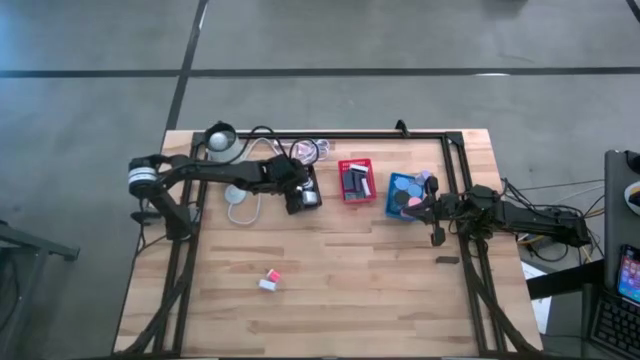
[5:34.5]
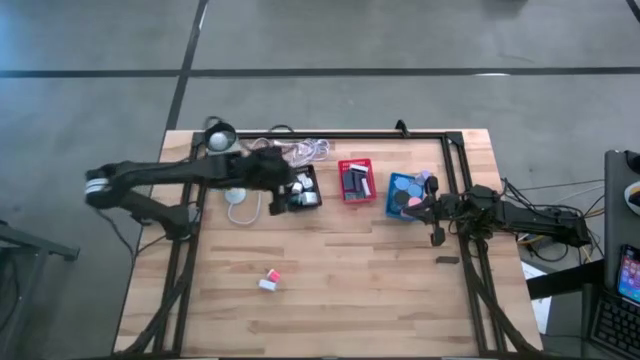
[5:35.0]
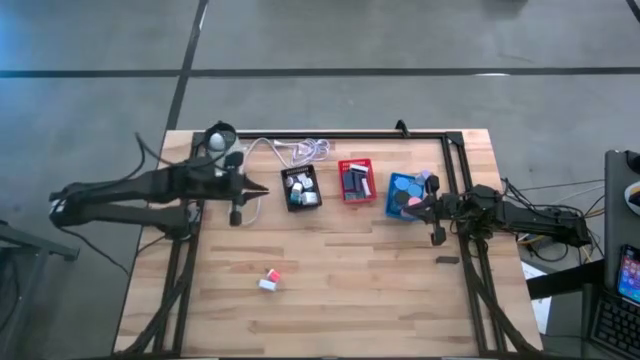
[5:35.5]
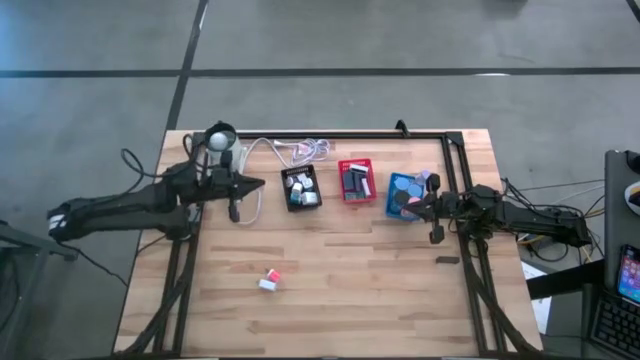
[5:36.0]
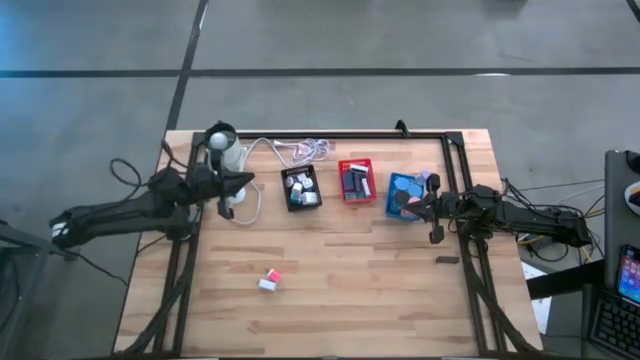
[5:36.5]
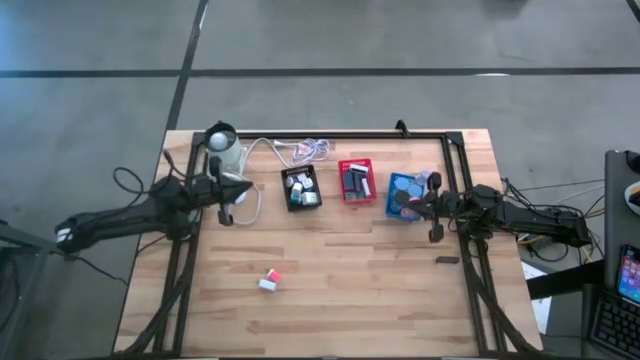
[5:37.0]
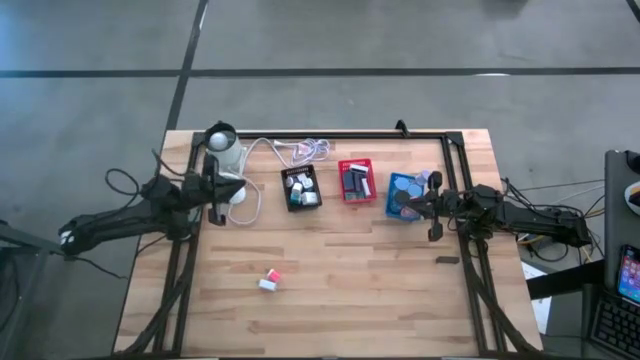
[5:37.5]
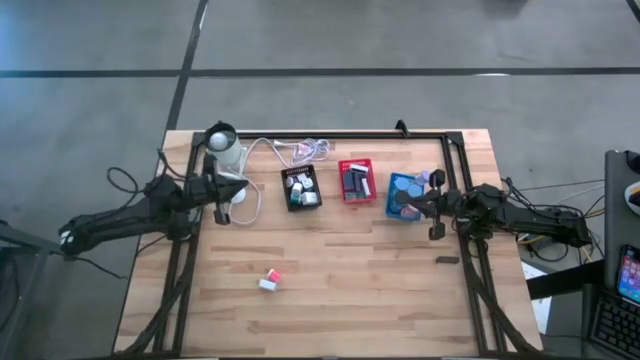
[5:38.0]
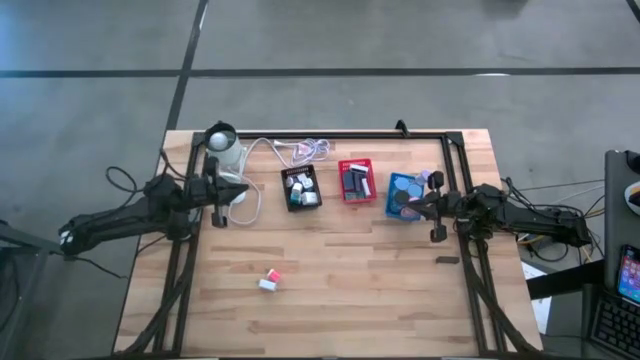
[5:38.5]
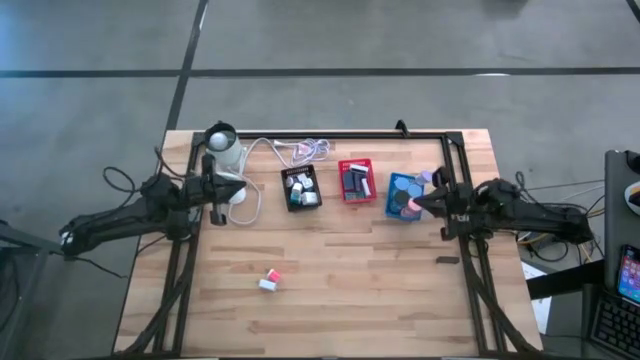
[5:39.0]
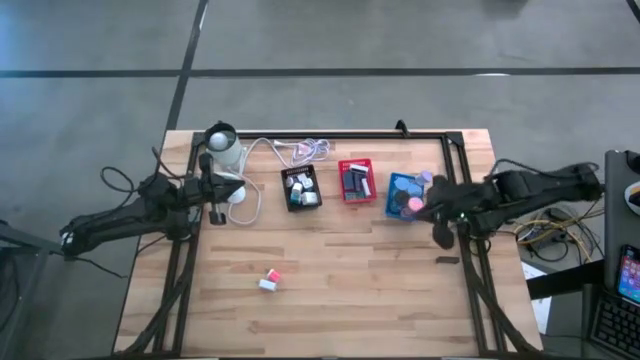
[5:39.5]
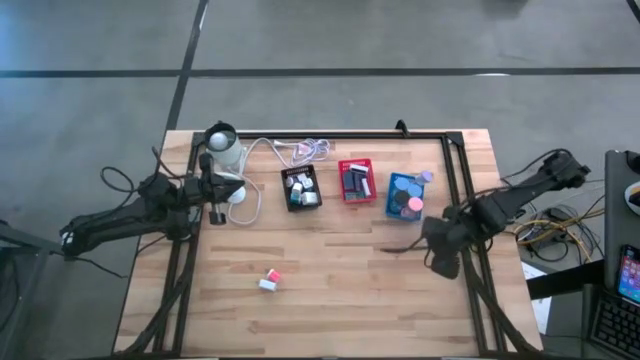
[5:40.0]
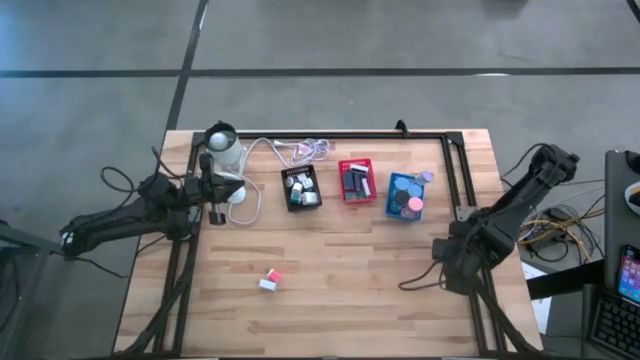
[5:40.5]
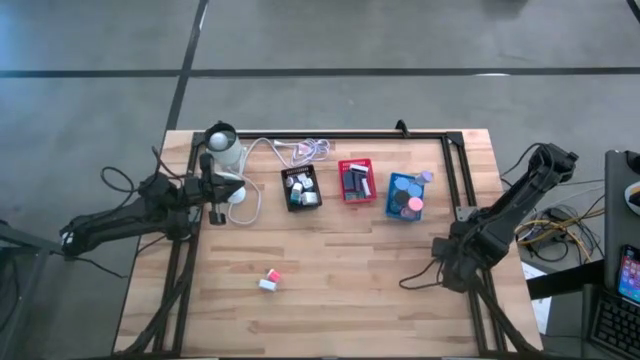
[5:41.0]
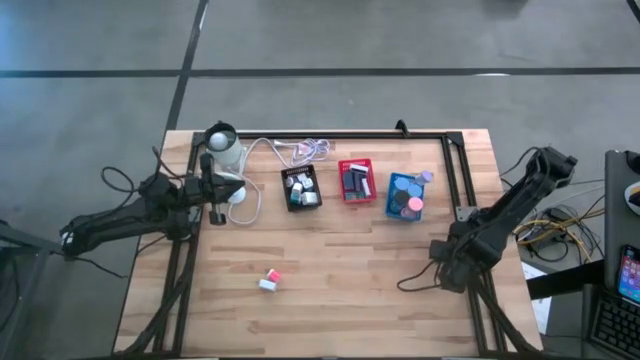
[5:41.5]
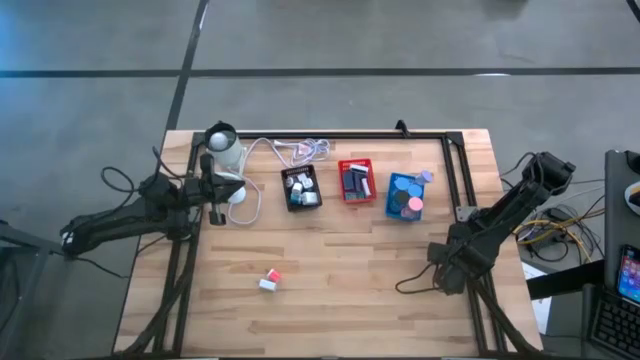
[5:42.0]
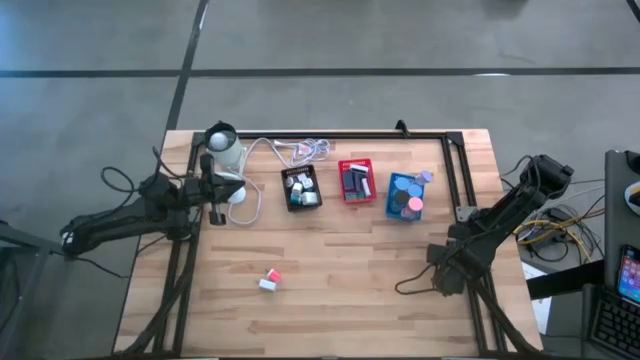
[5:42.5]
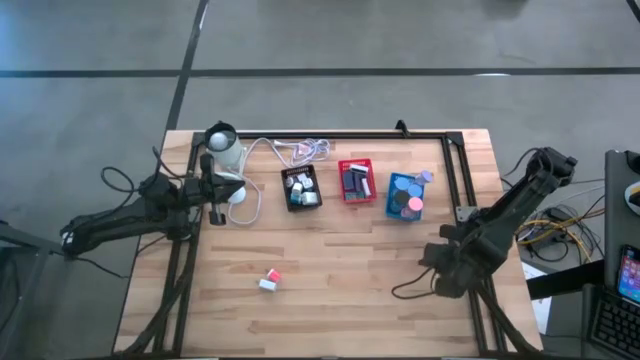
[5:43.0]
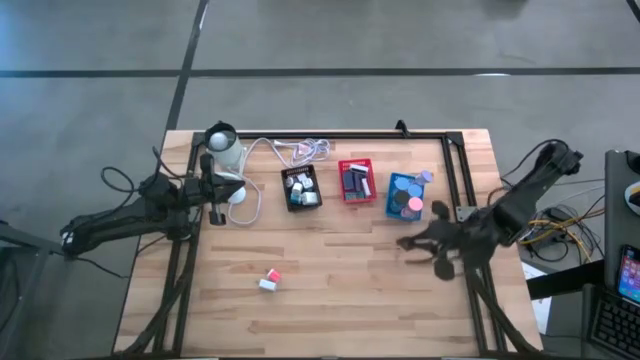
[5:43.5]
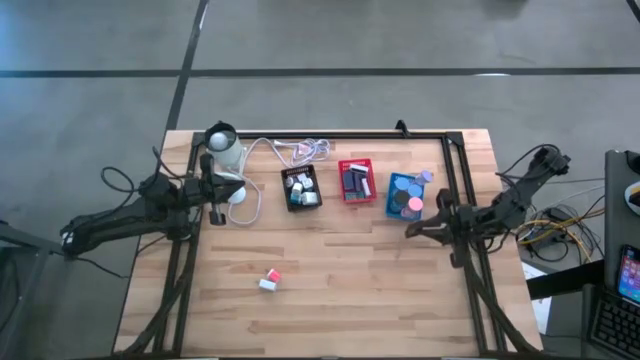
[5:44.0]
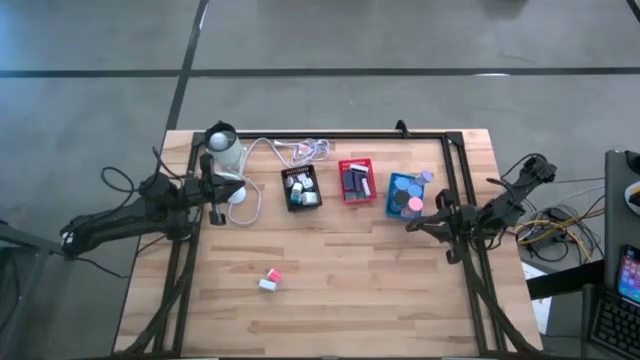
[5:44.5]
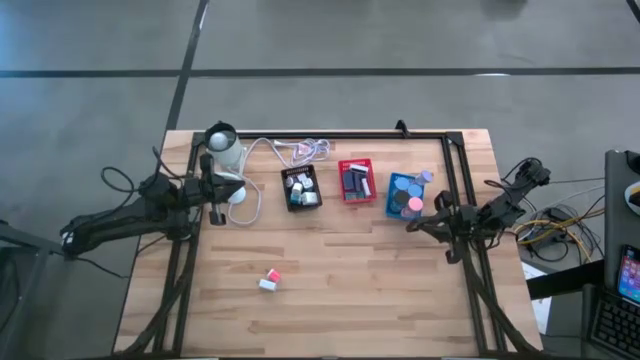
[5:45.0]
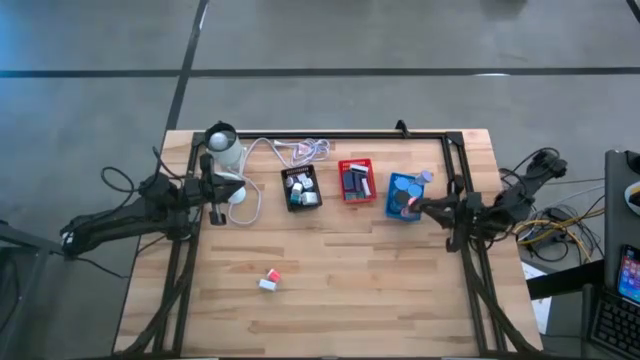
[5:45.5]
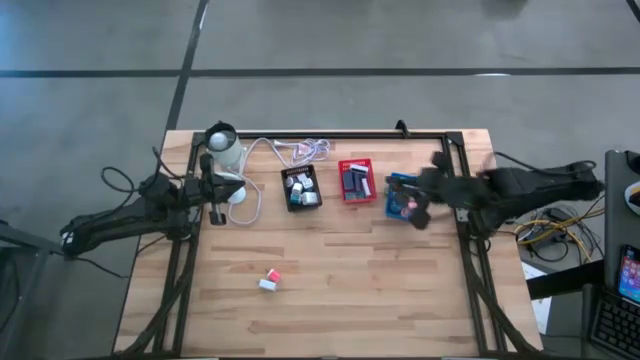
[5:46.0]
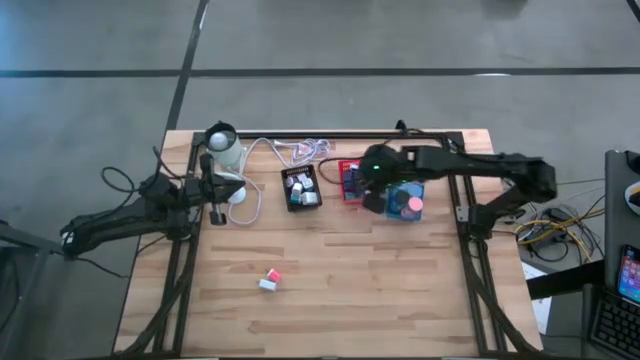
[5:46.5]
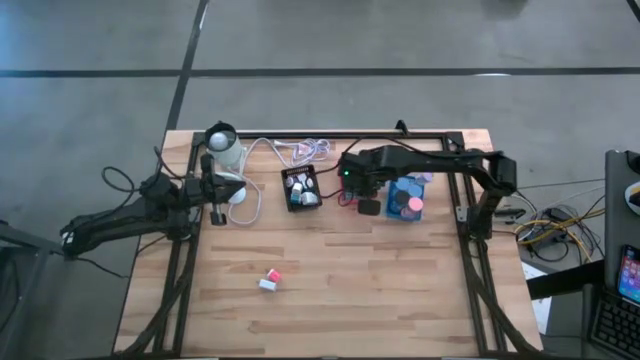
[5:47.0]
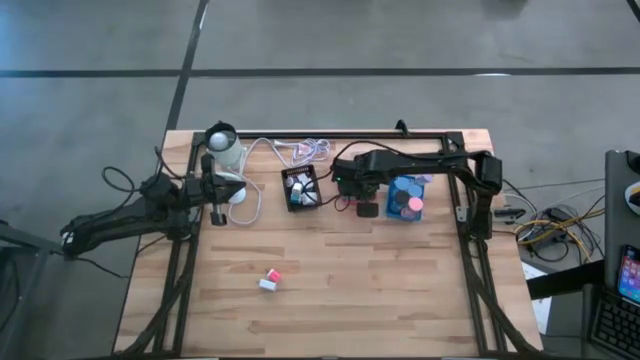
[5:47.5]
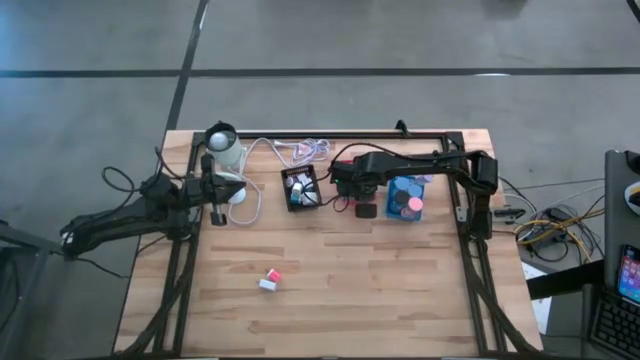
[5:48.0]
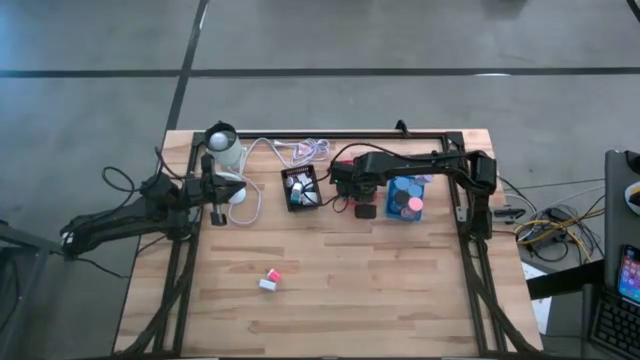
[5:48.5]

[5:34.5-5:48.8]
Task: Pick & Place Office items
Put the black digital clock into the red bin

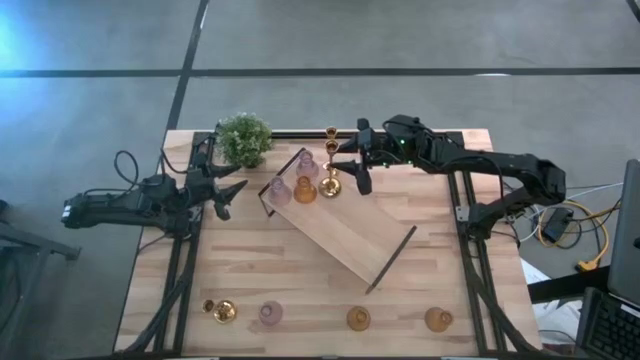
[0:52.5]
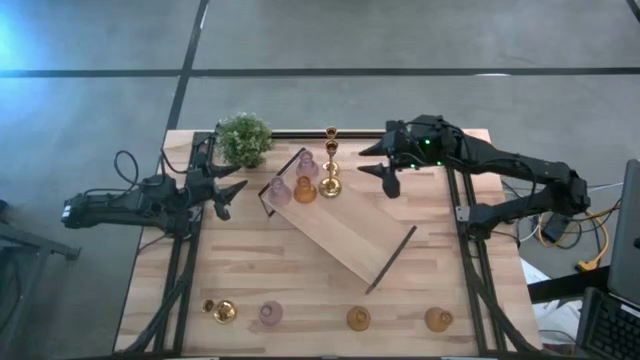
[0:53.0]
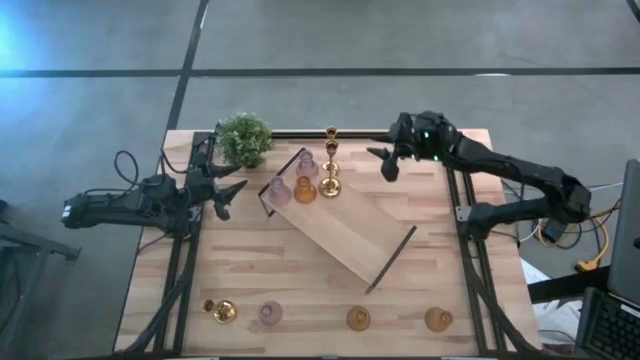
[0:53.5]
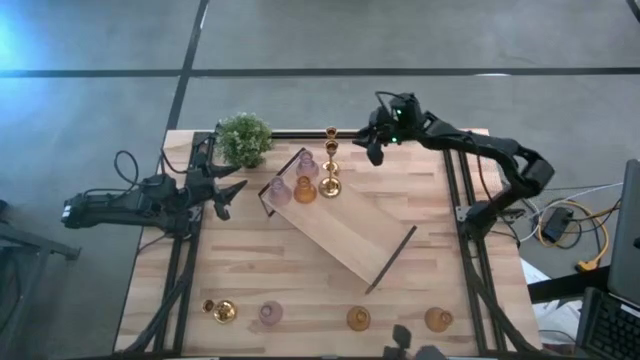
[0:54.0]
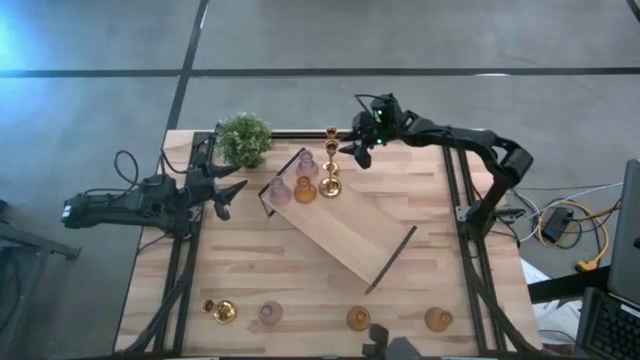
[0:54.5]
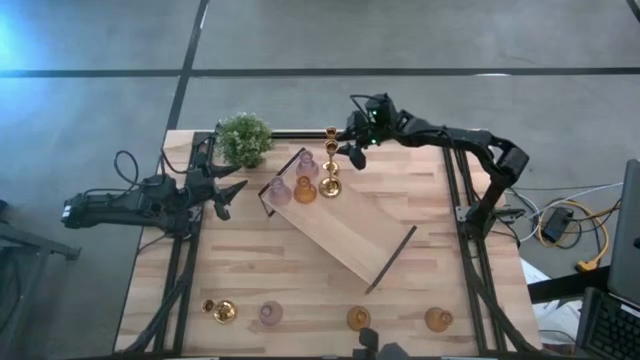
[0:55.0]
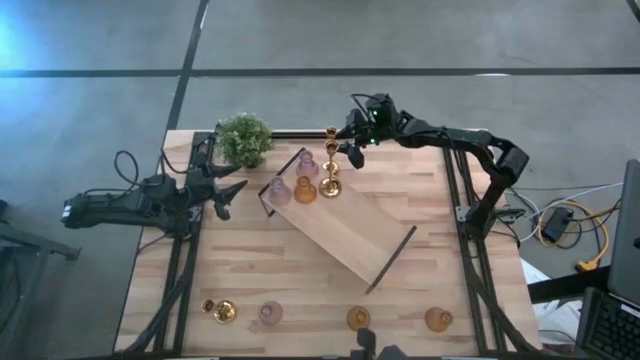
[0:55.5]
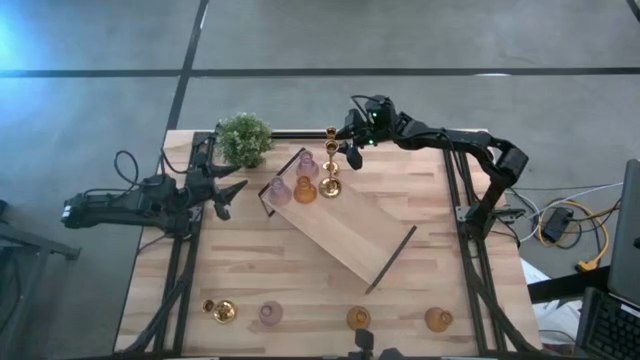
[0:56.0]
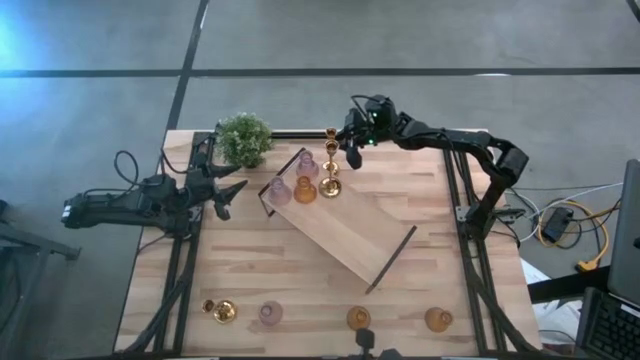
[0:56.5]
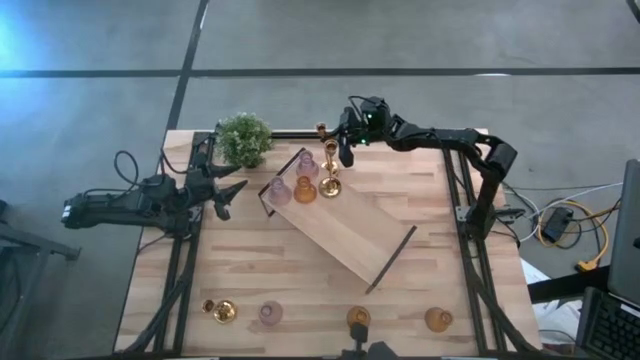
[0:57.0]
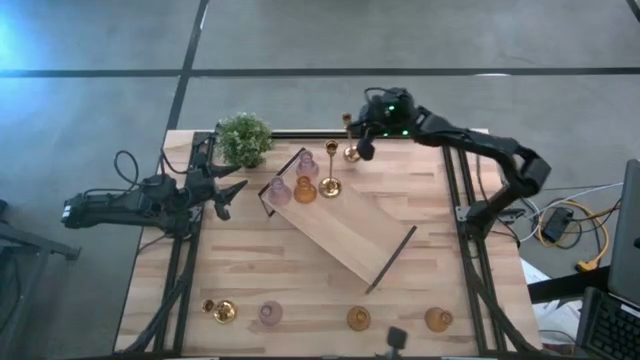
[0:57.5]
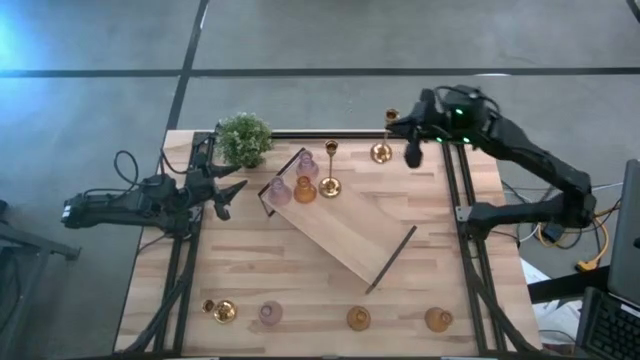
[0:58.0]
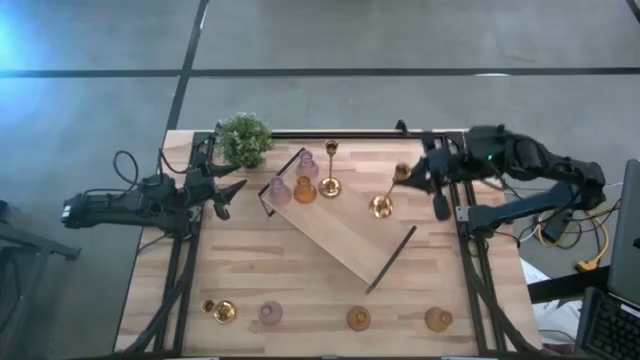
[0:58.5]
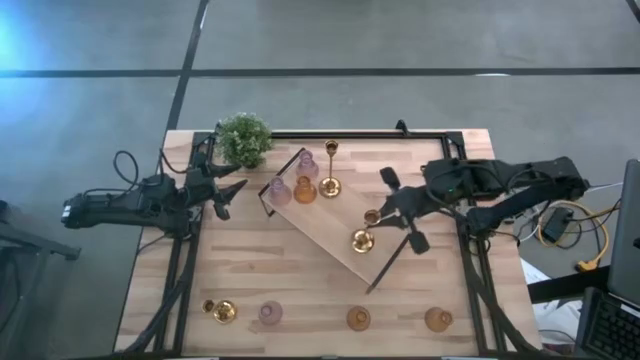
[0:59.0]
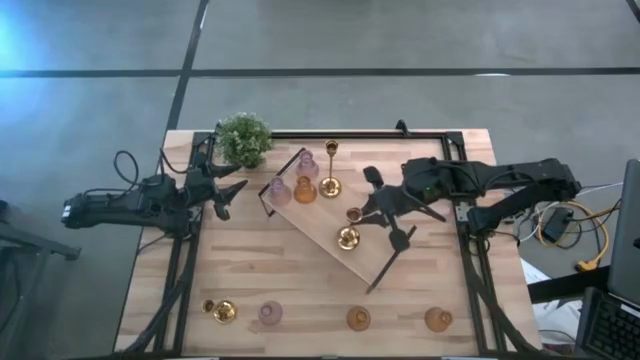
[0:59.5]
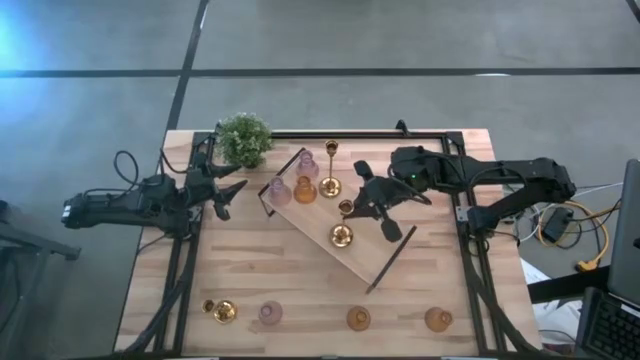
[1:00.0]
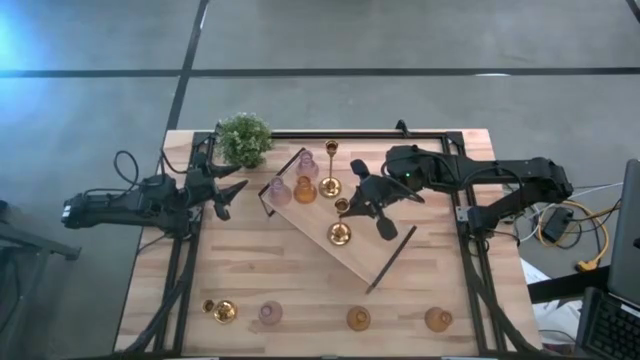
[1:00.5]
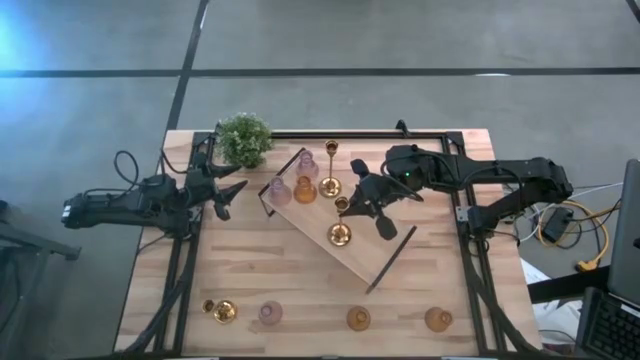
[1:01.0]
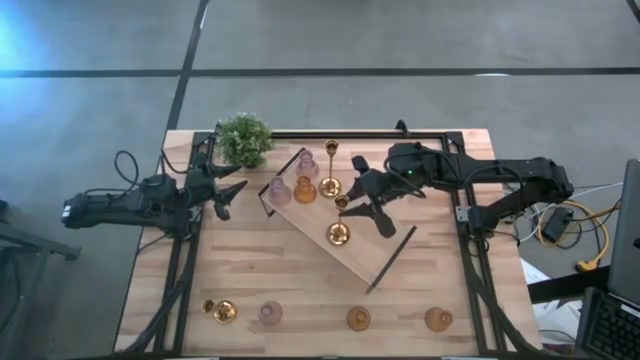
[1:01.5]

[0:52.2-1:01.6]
Task: Pick & Place candle stick holders
Put the top gold candle holder on the shelf
